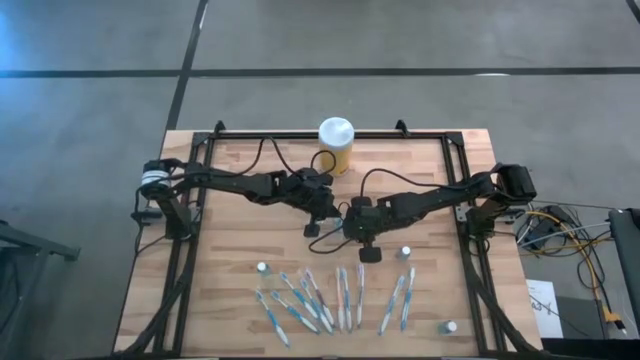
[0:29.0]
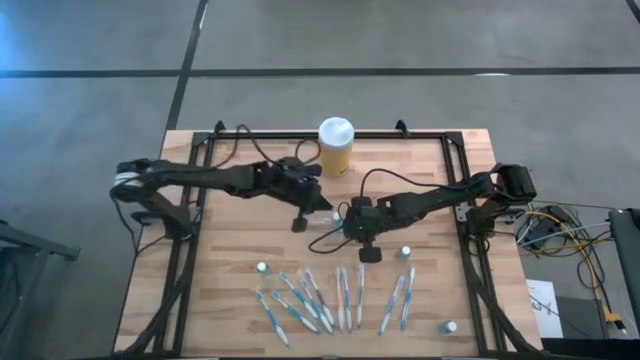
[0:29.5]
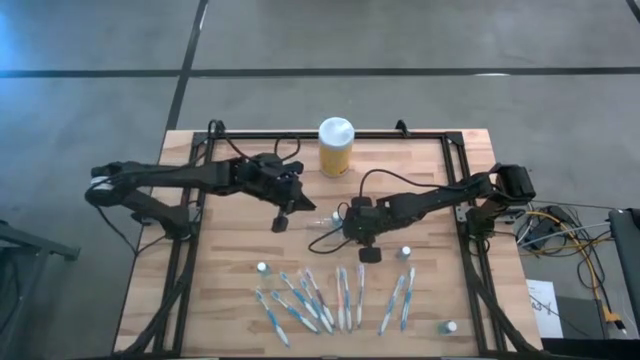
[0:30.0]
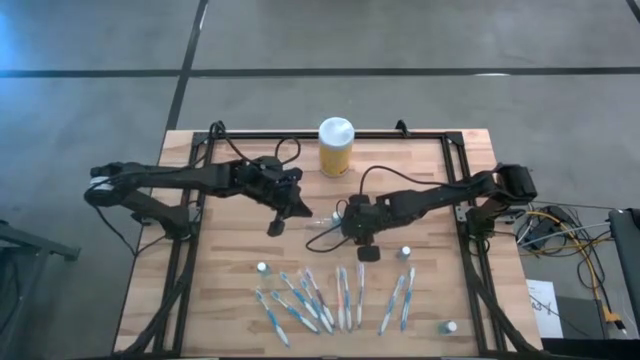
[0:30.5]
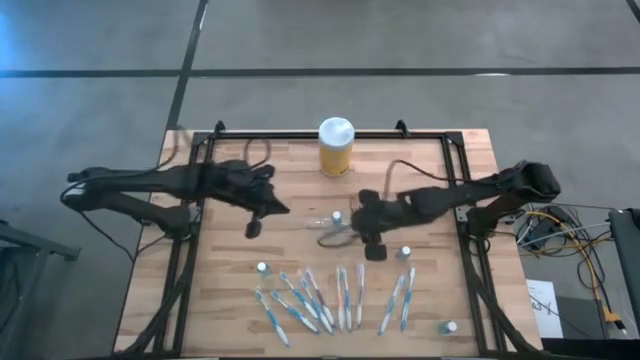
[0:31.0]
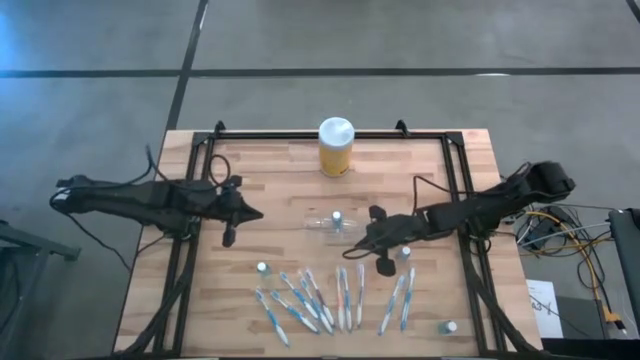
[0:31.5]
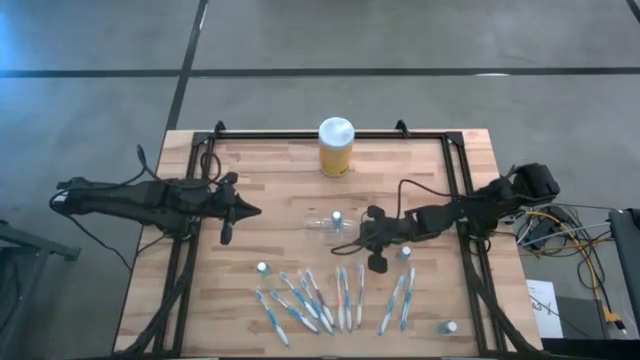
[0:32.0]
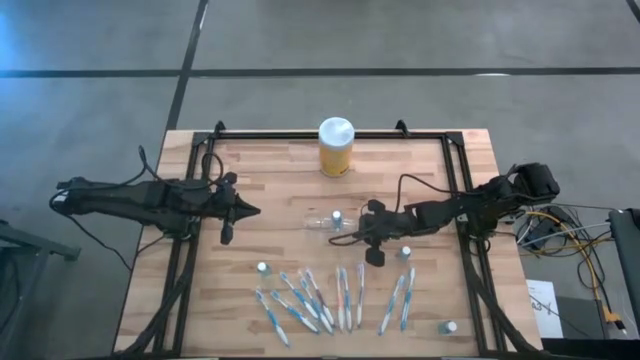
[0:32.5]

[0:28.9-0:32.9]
Task: Pick & Place toothbrushing station
Adjust the transparent organizer

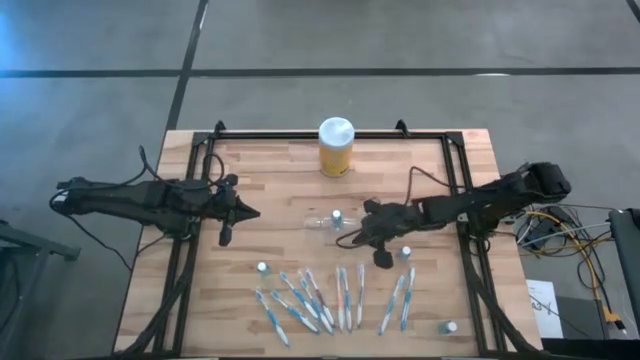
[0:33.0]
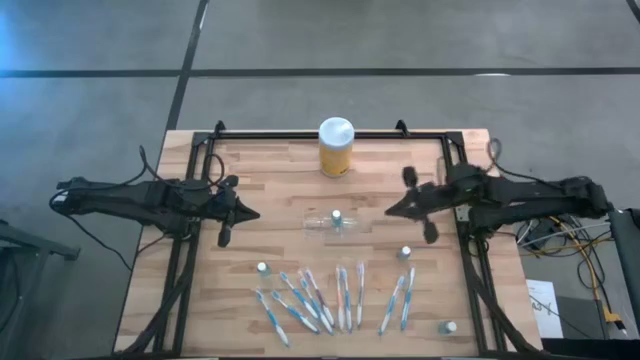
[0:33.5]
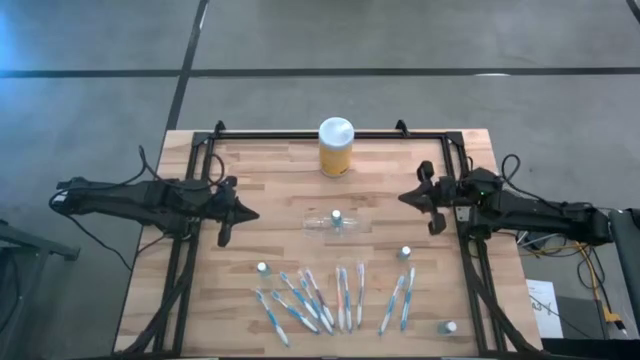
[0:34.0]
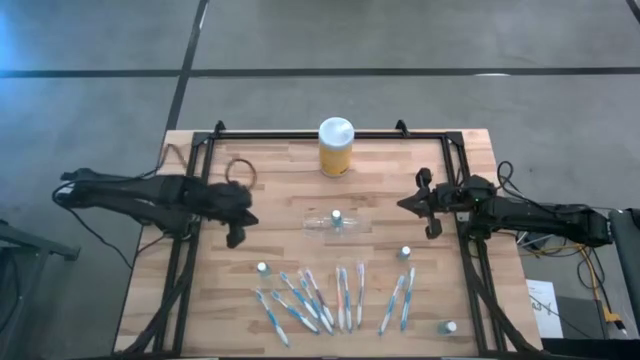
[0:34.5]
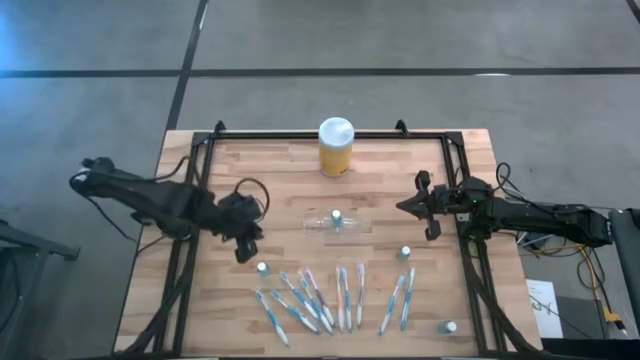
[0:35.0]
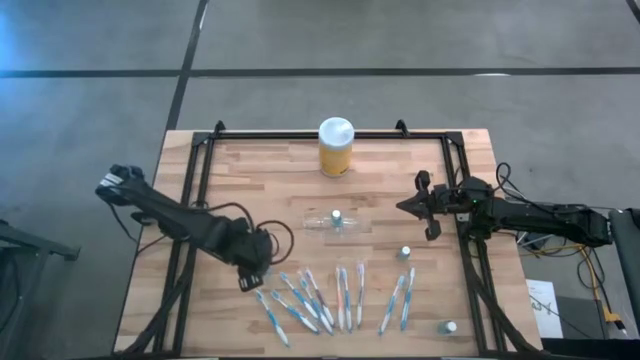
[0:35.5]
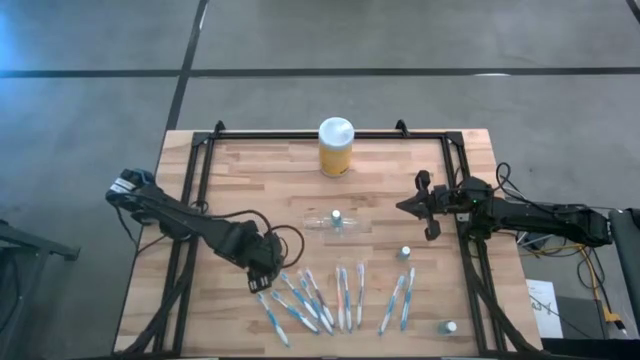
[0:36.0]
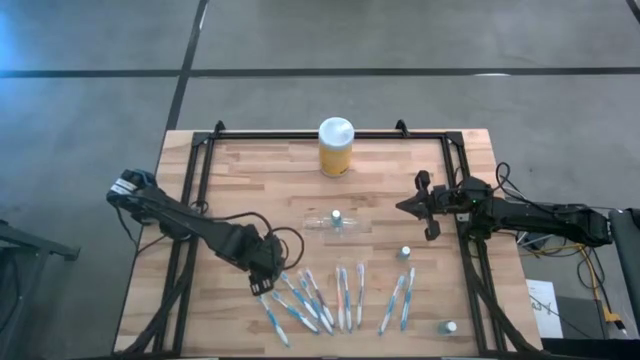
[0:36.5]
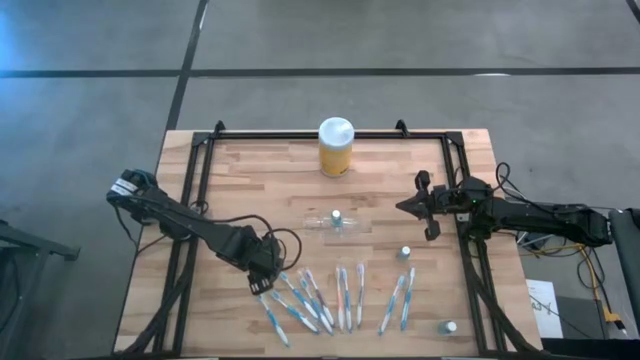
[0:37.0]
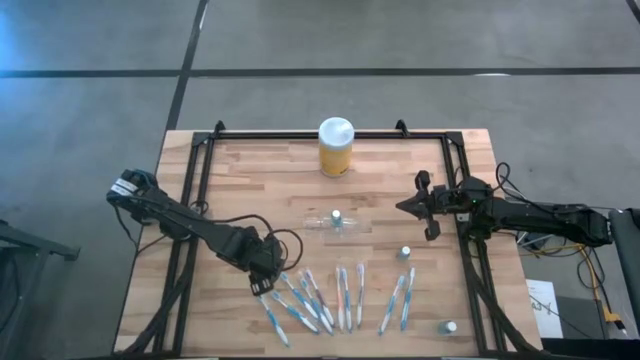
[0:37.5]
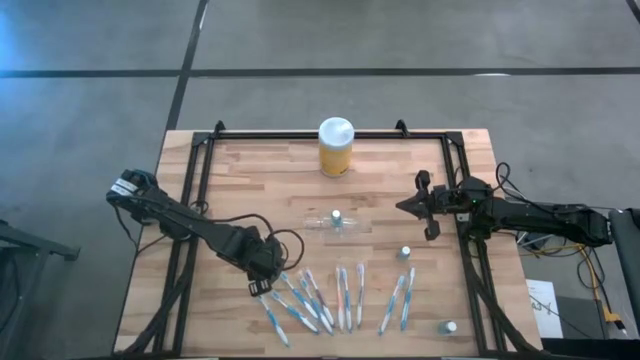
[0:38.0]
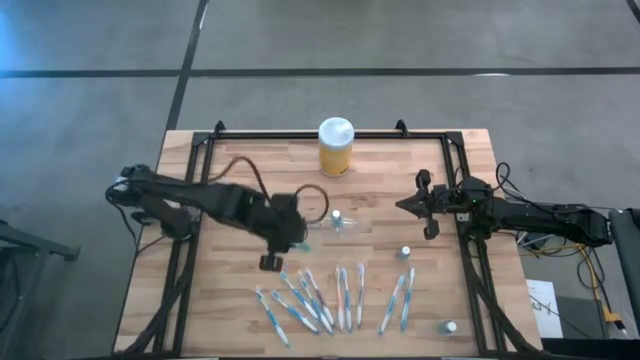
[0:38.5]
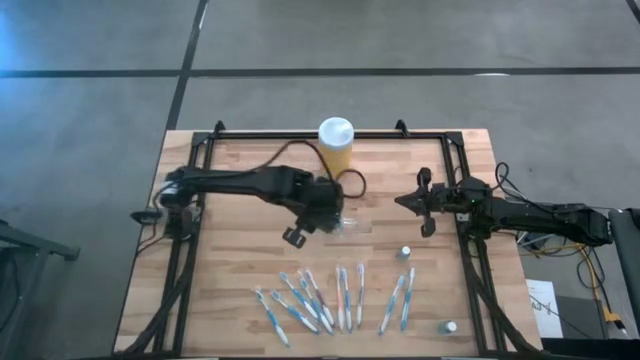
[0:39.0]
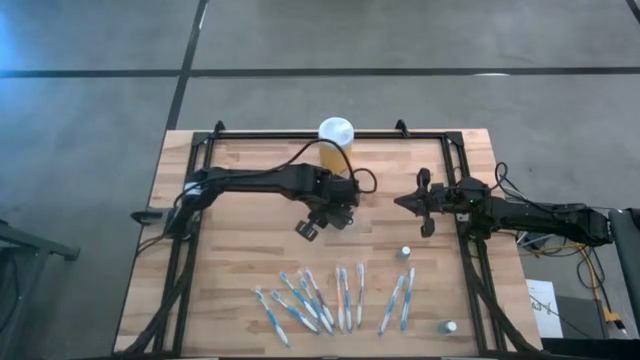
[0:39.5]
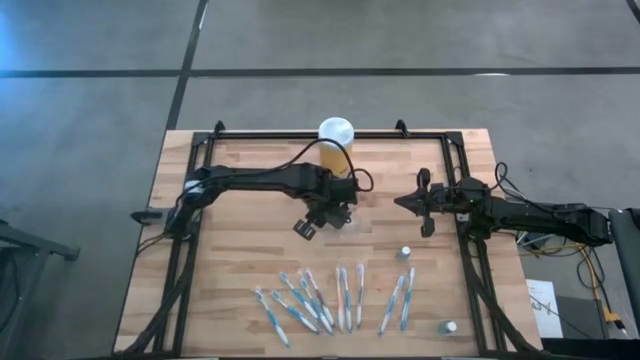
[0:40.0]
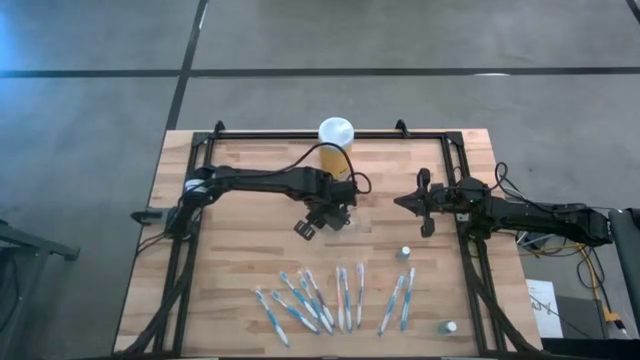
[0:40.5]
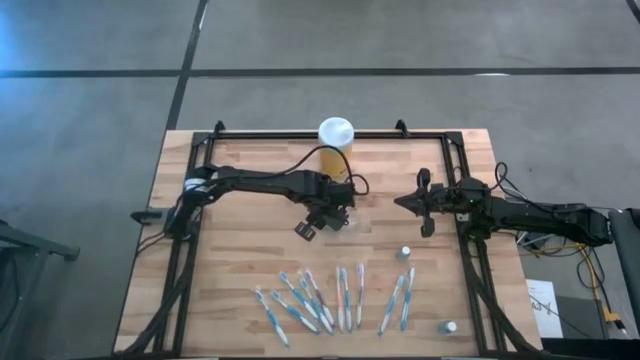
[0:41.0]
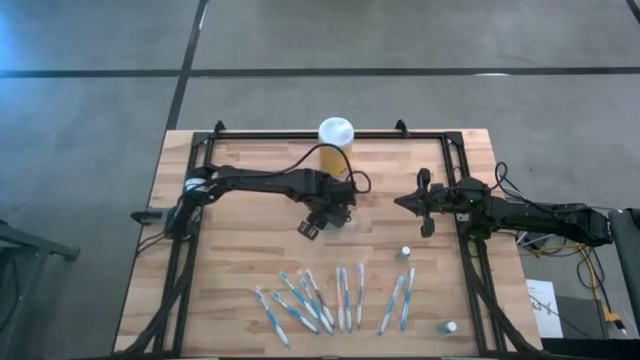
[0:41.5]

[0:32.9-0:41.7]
Put the blue mouthwash into the transparent organizer

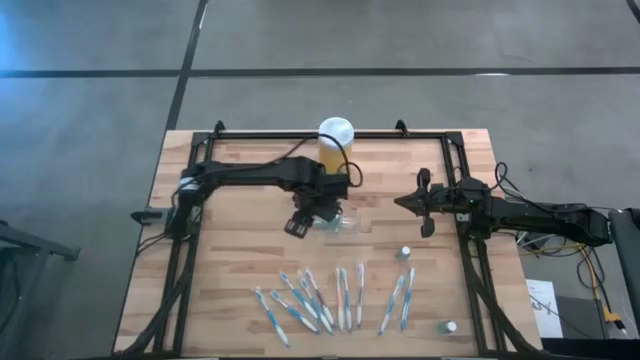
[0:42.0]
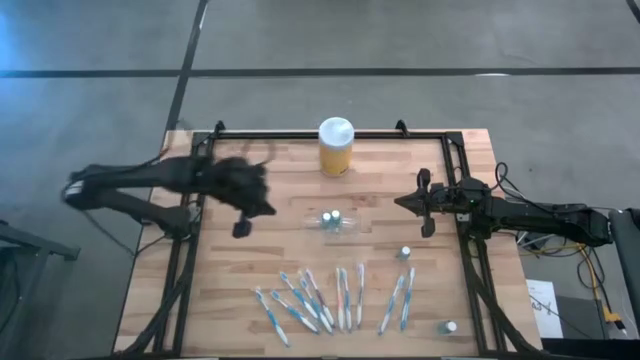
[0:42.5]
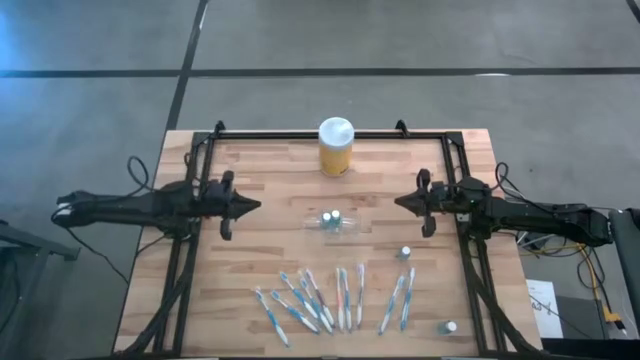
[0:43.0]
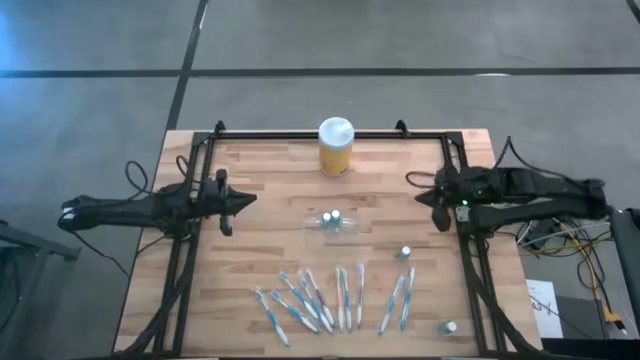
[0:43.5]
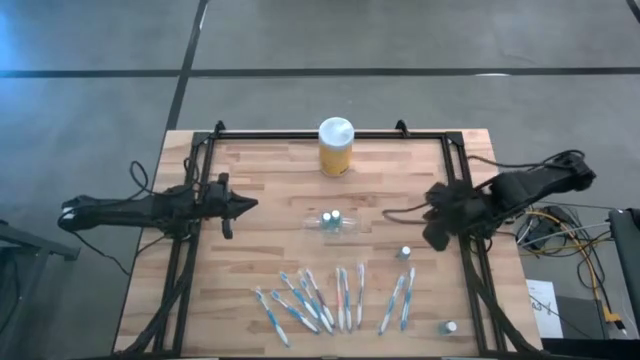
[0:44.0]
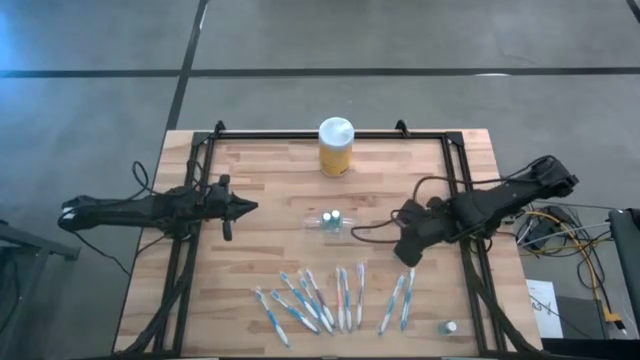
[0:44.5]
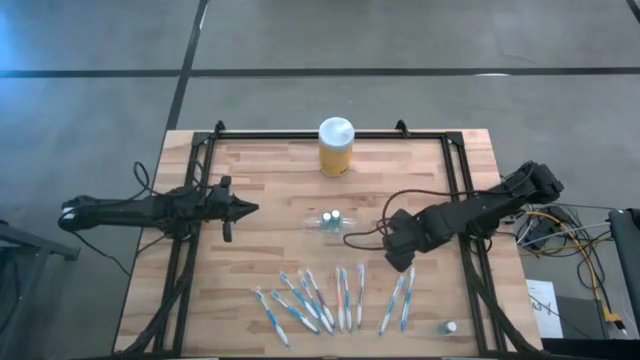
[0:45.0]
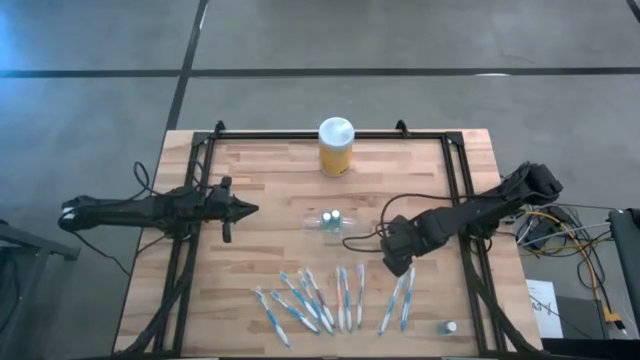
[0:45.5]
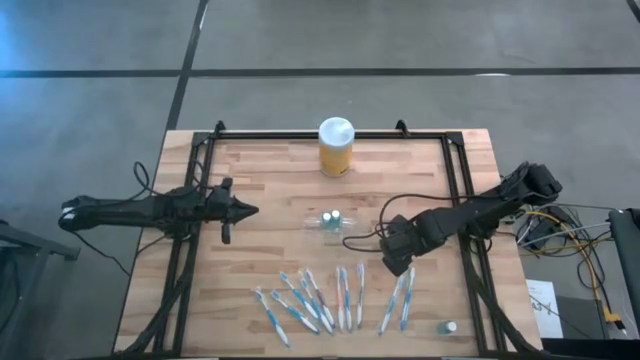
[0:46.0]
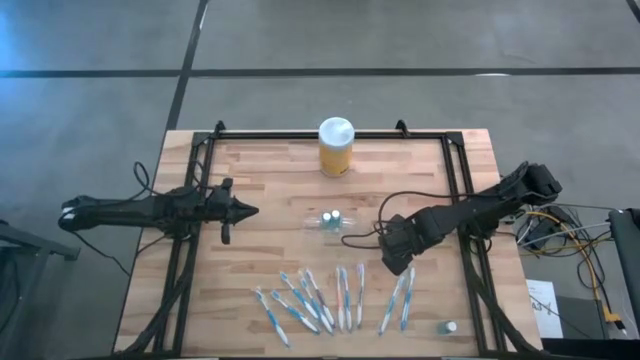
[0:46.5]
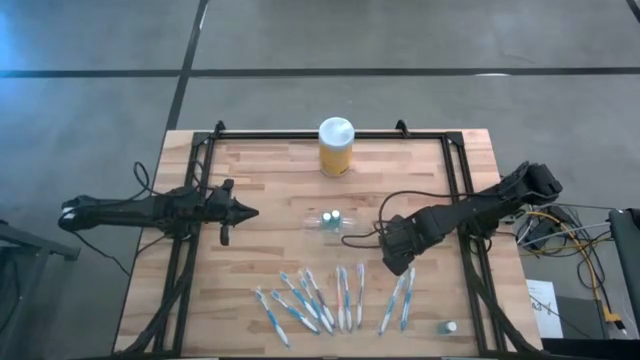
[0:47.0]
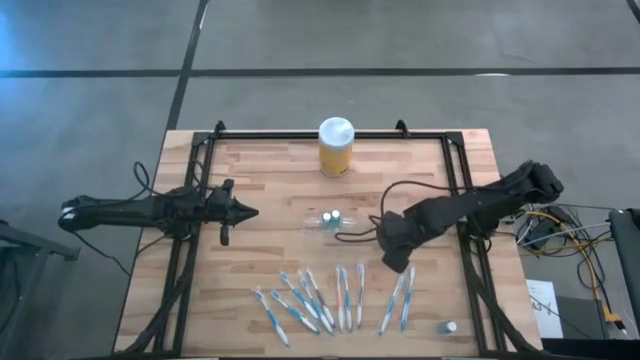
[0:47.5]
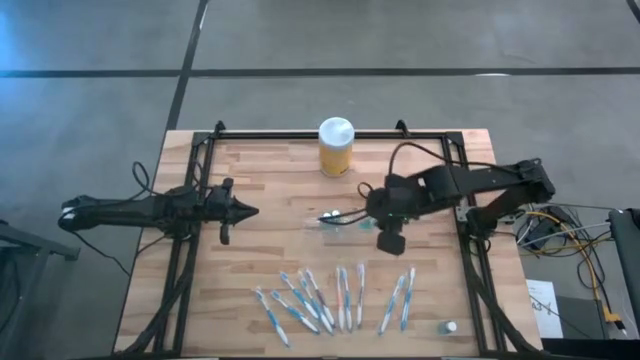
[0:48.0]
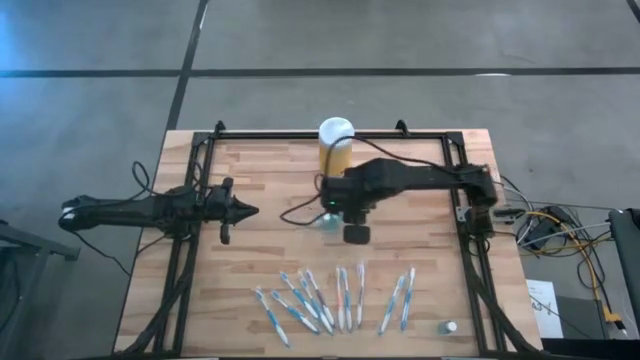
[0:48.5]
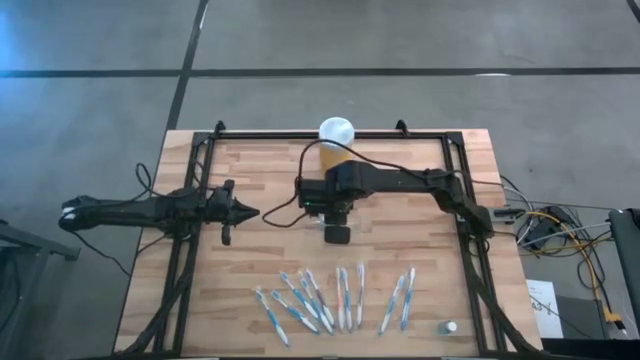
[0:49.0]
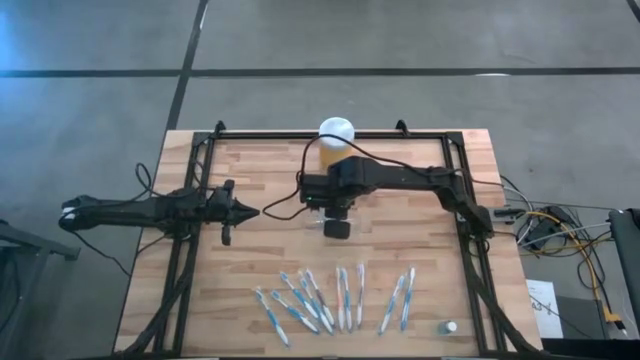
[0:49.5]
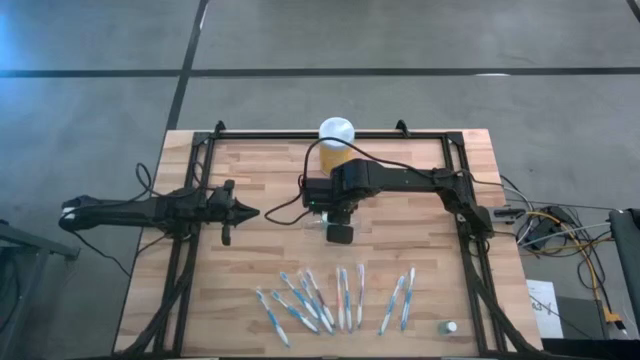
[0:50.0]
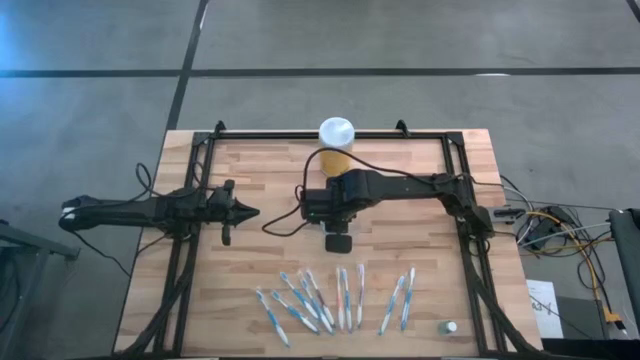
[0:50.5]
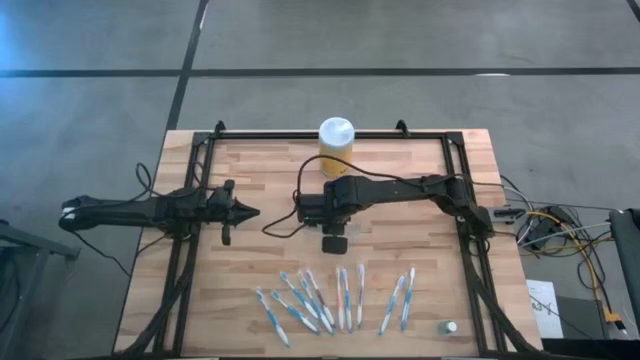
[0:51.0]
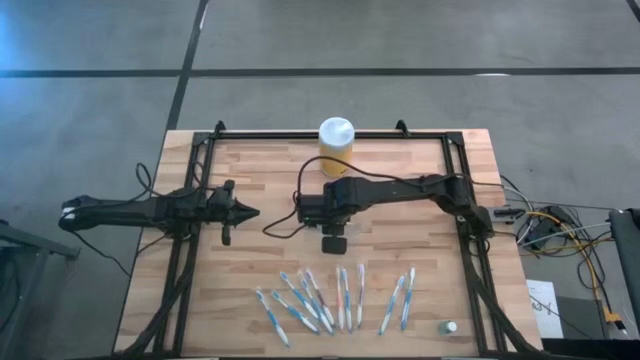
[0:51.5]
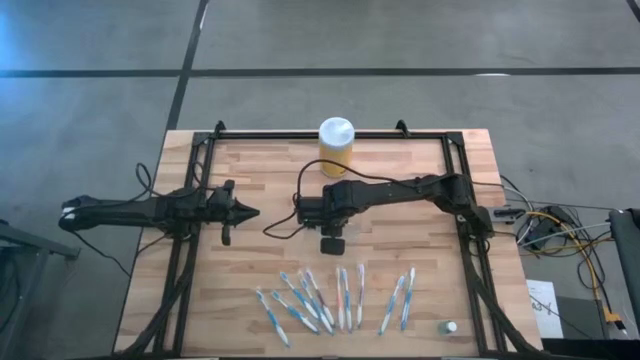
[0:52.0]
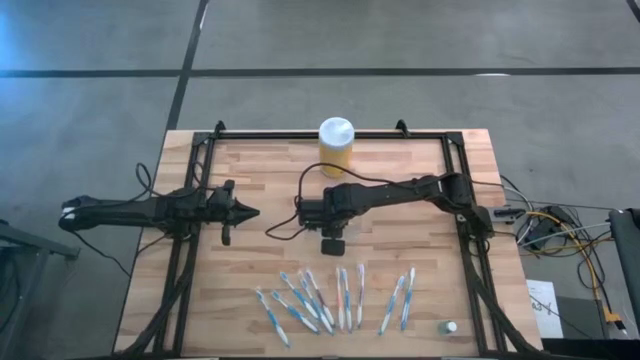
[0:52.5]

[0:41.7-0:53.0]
Put the blue mouthwash into the transparent organizer
